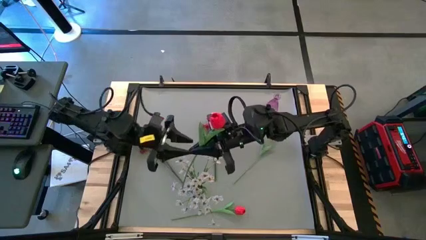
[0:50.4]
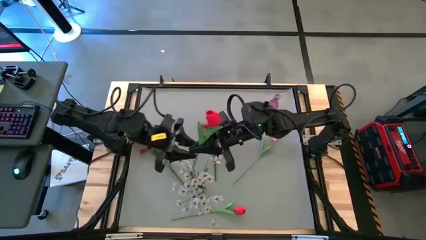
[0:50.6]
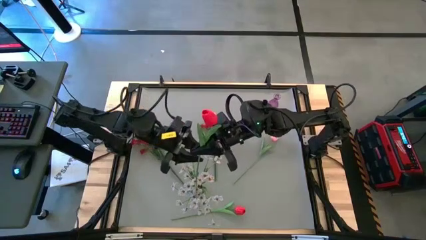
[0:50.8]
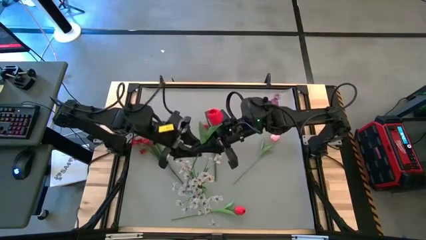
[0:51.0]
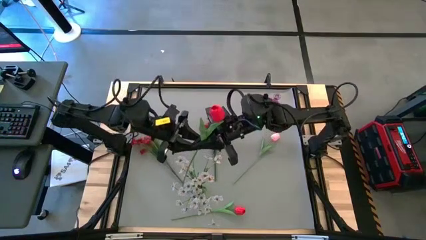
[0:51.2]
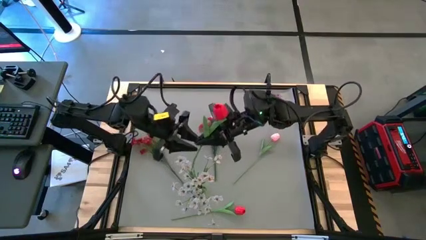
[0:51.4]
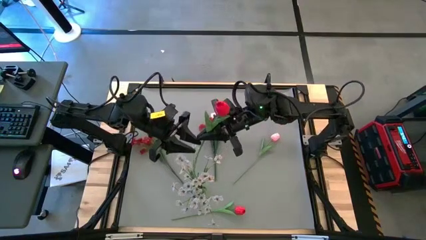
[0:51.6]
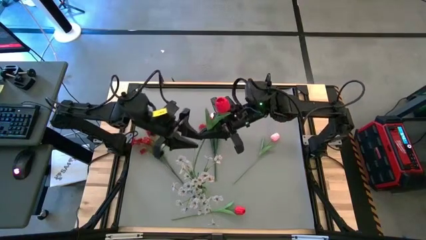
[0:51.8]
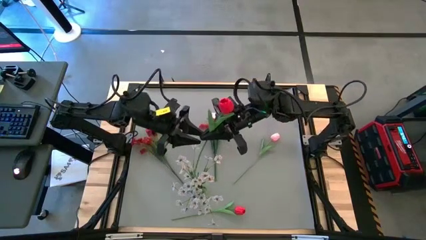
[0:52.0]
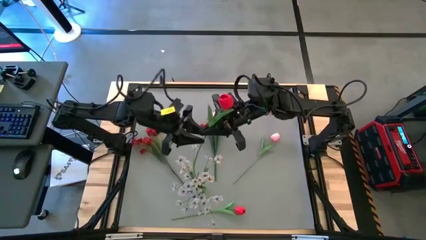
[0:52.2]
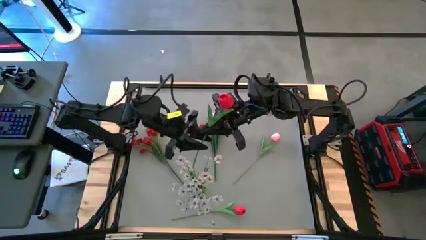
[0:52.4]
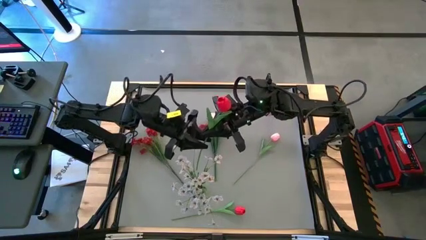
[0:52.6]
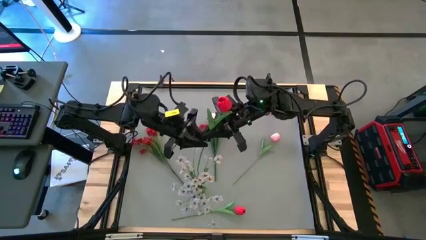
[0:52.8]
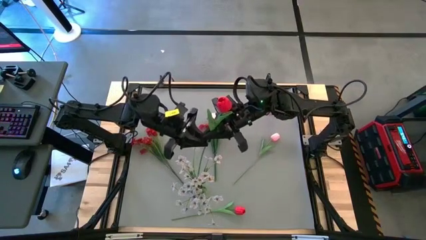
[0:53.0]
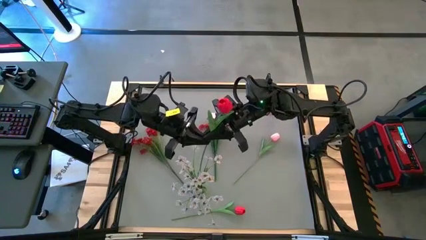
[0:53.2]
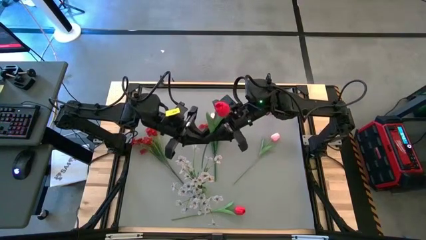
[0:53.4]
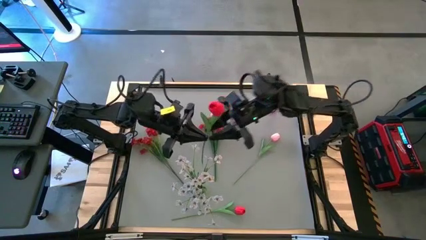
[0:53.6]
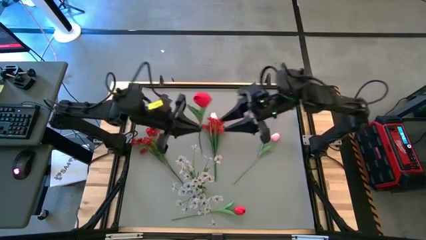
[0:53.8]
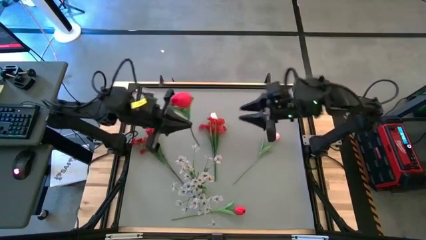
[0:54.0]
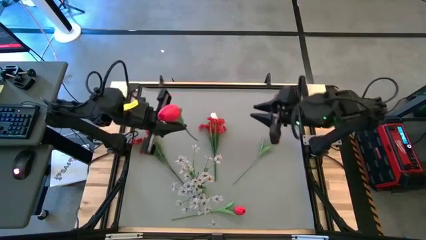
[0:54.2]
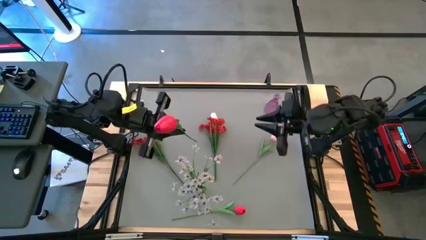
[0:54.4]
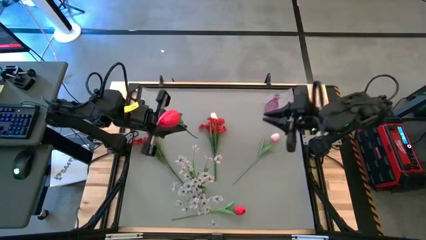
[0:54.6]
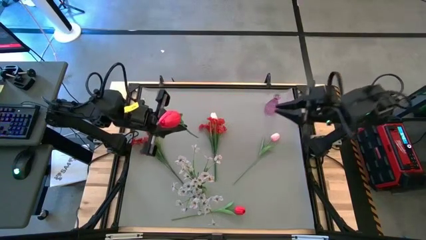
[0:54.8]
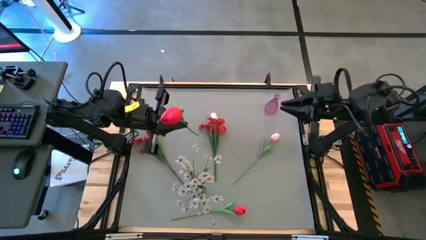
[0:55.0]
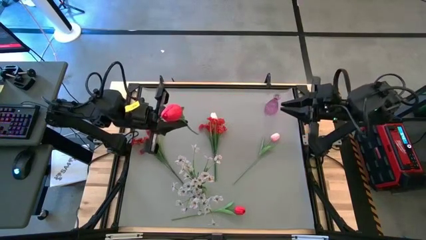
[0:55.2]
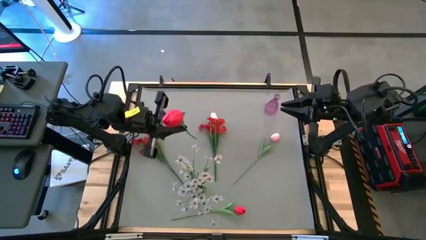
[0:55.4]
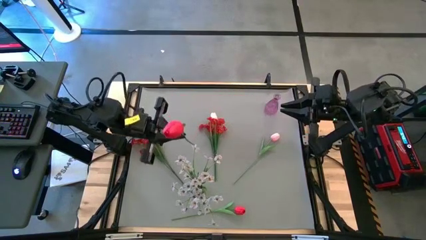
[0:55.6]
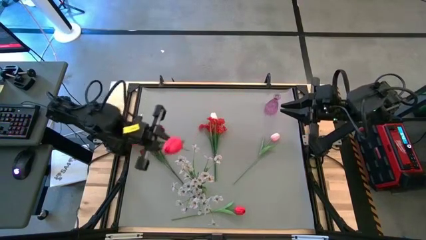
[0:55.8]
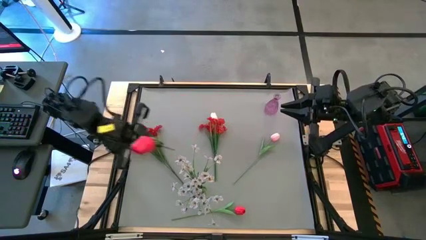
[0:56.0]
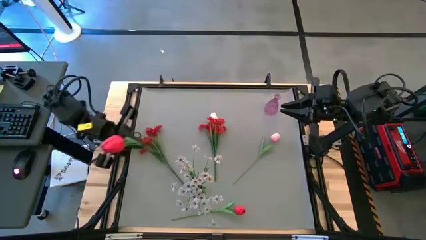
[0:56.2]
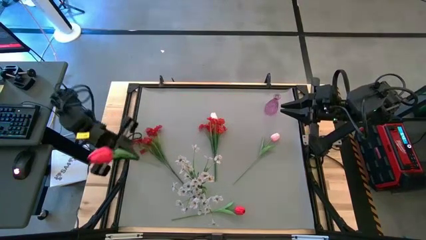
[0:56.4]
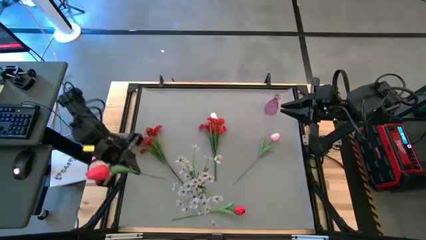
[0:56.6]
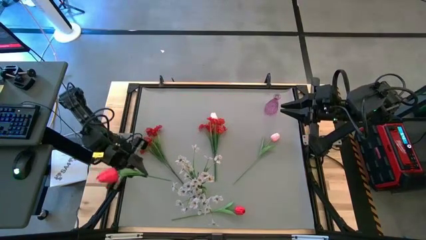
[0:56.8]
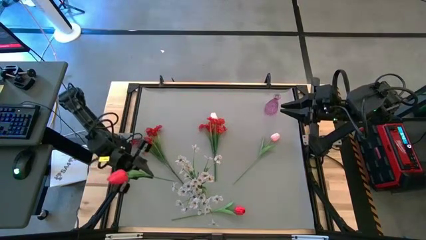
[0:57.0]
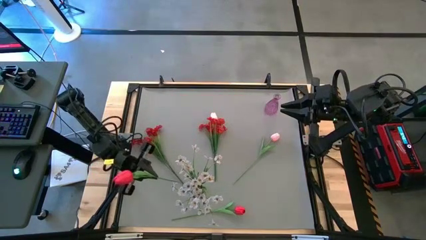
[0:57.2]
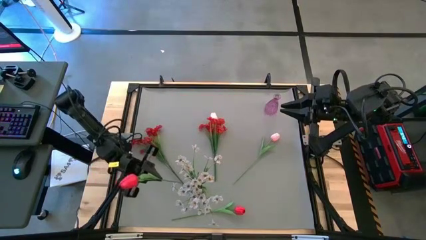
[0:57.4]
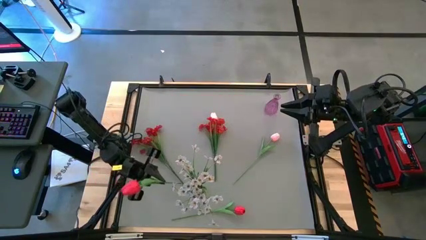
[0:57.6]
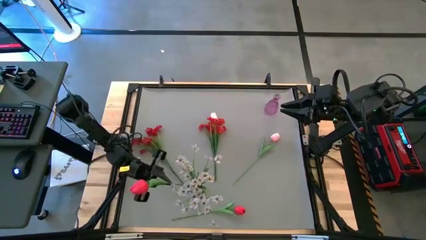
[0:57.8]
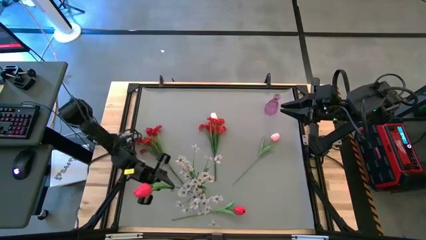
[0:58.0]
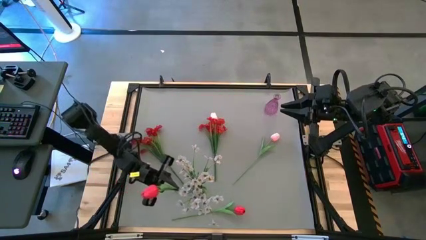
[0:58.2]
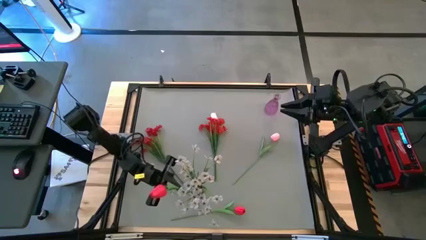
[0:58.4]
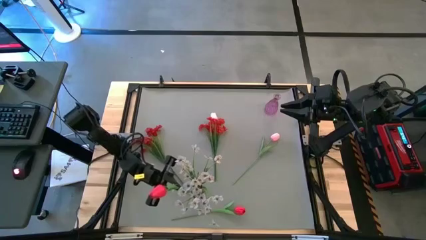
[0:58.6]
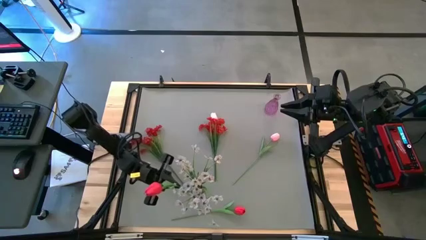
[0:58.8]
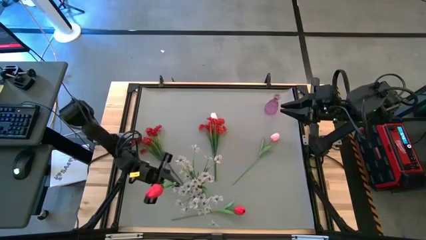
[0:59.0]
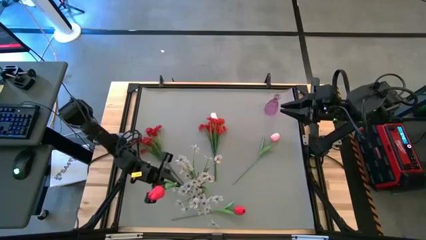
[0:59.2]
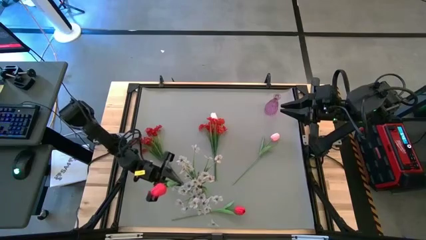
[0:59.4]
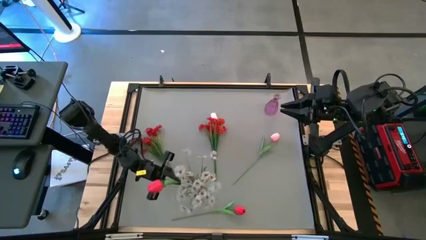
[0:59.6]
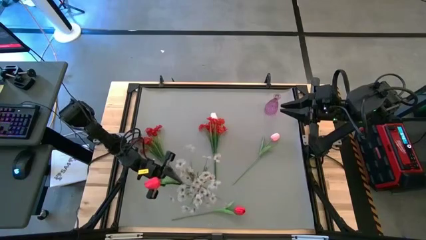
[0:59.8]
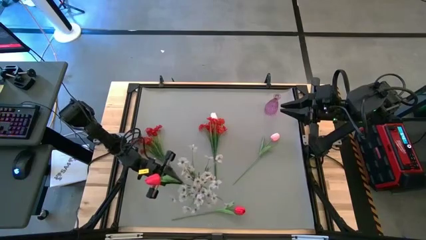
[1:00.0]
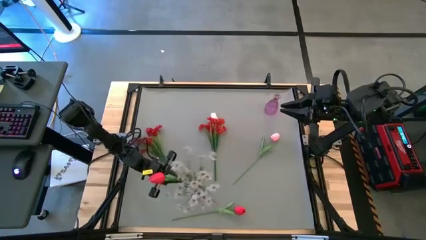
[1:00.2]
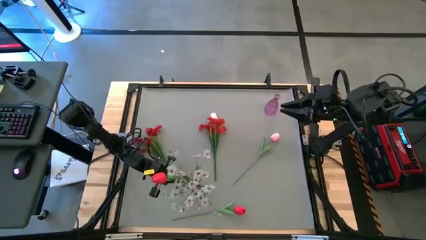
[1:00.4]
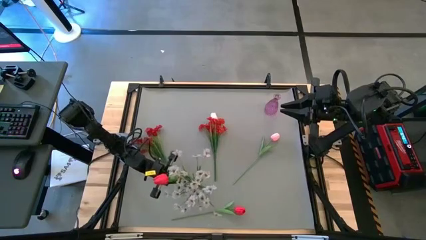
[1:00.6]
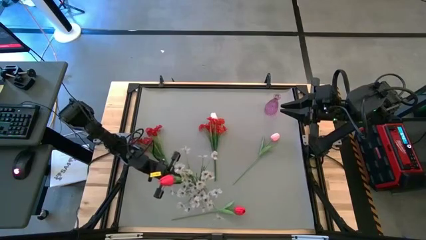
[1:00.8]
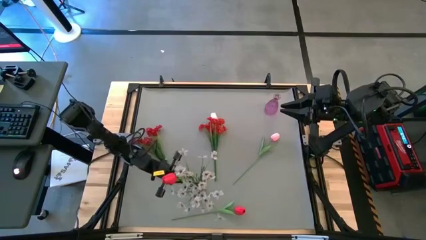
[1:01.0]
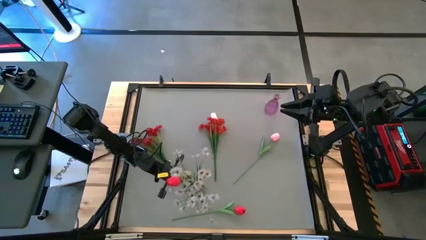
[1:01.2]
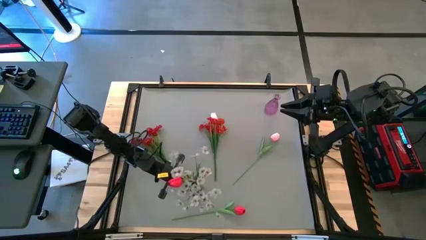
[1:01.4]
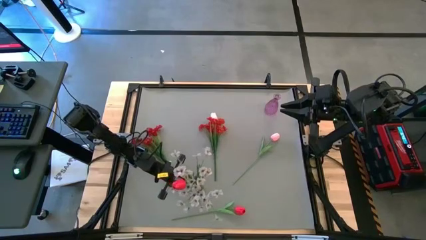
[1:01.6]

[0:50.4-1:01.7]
Task: Sort flowers into vase by color
Put the bottom red flower into the green vase

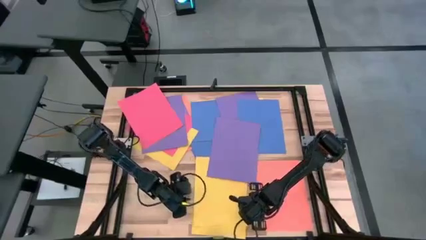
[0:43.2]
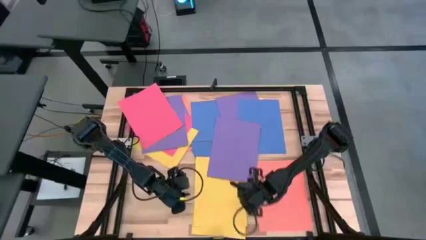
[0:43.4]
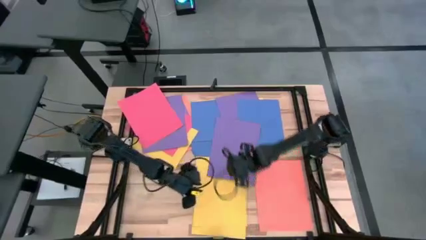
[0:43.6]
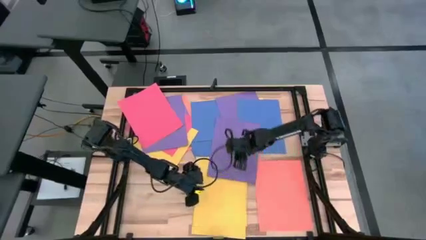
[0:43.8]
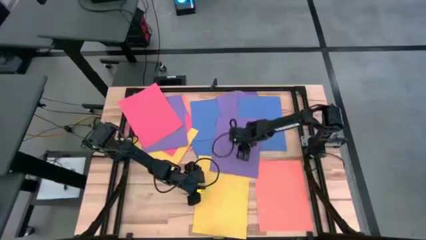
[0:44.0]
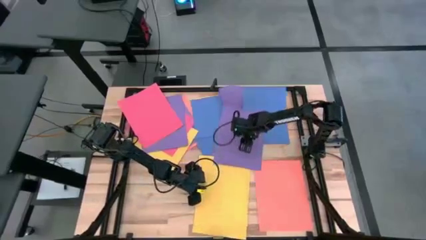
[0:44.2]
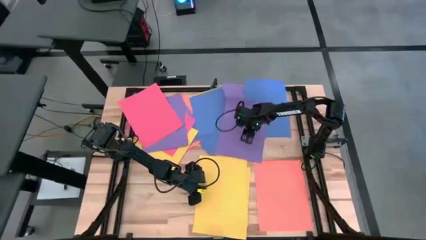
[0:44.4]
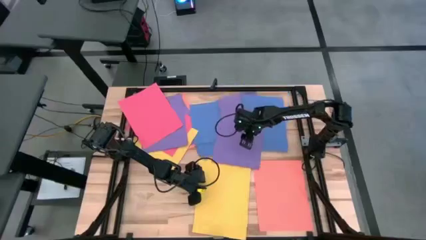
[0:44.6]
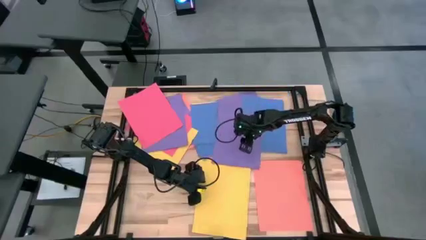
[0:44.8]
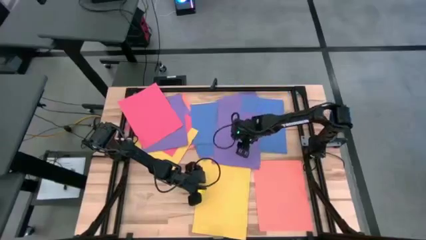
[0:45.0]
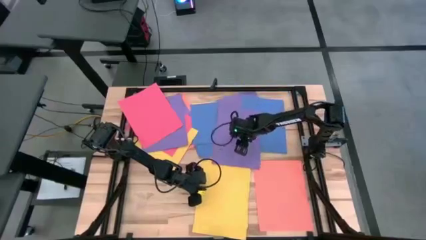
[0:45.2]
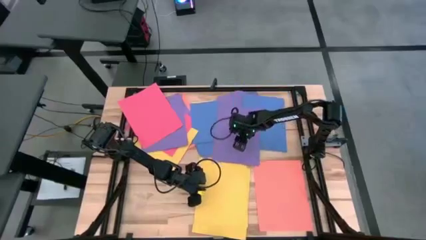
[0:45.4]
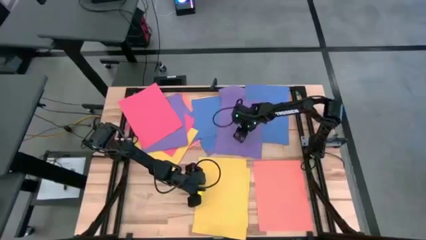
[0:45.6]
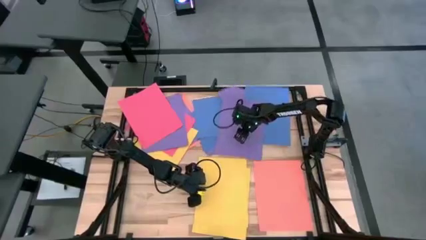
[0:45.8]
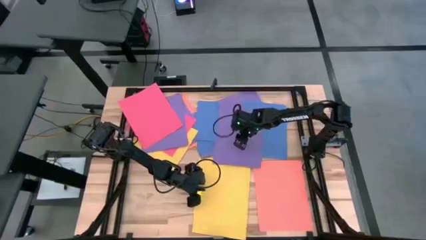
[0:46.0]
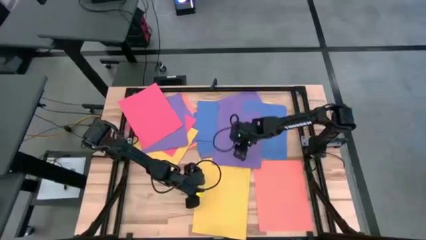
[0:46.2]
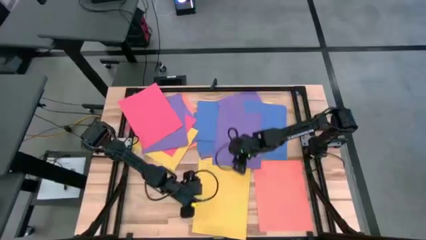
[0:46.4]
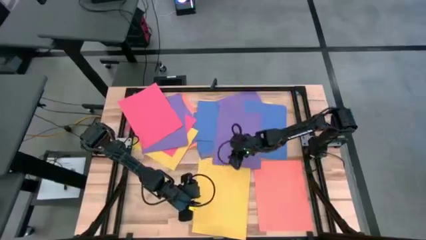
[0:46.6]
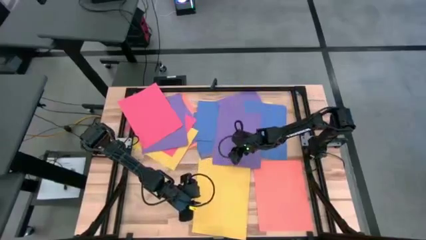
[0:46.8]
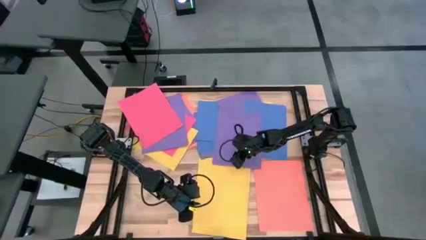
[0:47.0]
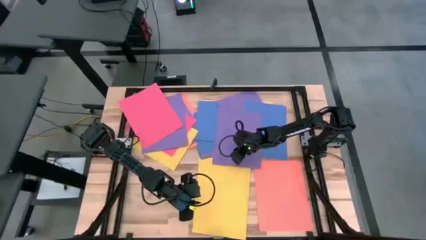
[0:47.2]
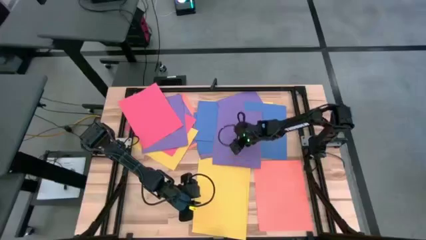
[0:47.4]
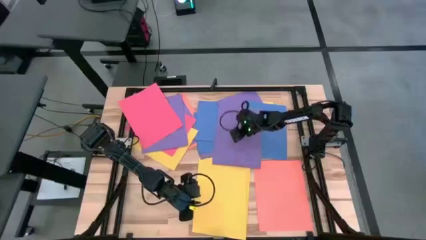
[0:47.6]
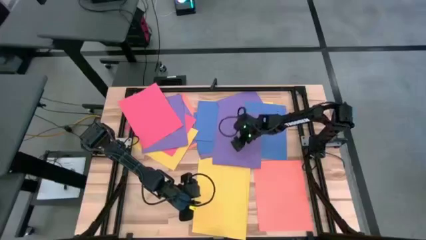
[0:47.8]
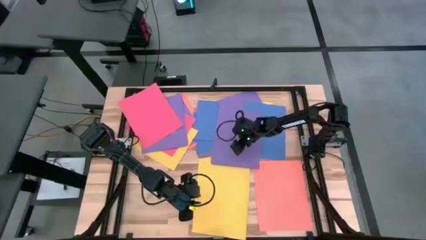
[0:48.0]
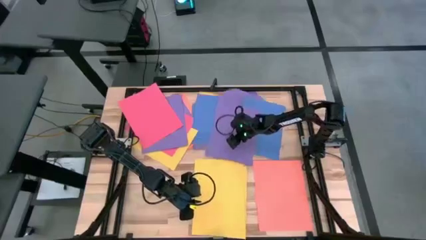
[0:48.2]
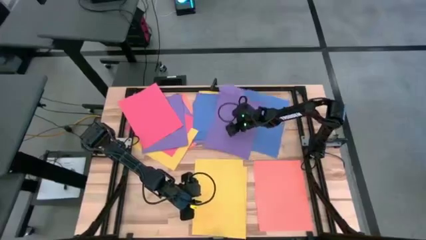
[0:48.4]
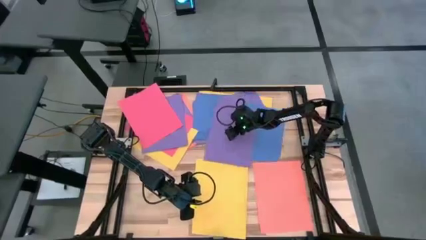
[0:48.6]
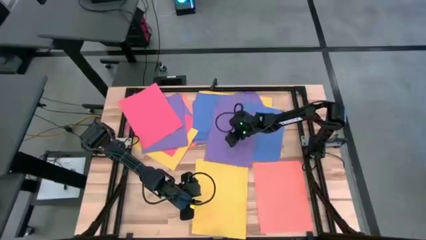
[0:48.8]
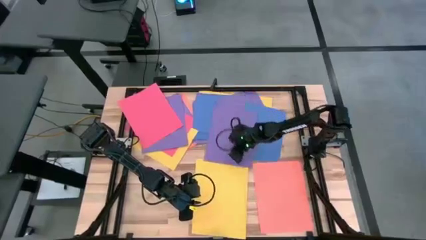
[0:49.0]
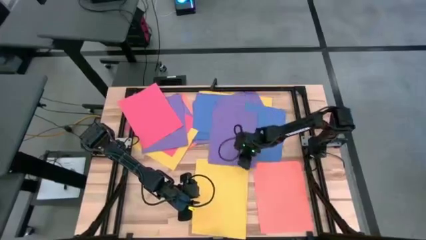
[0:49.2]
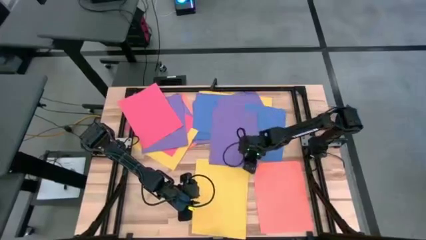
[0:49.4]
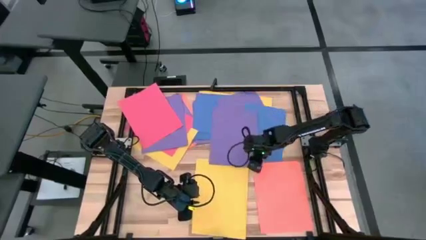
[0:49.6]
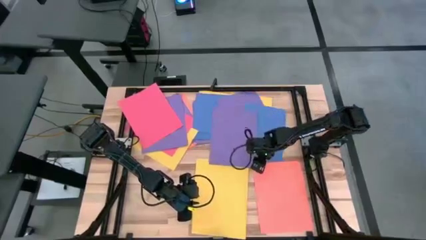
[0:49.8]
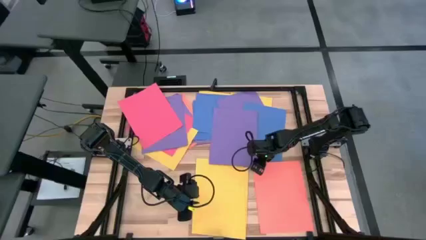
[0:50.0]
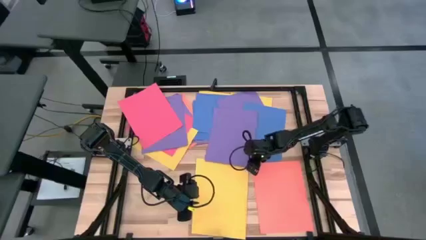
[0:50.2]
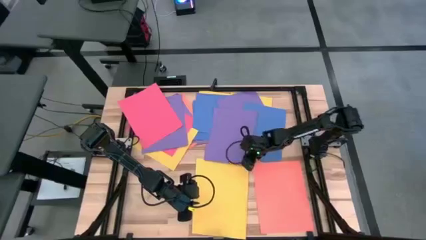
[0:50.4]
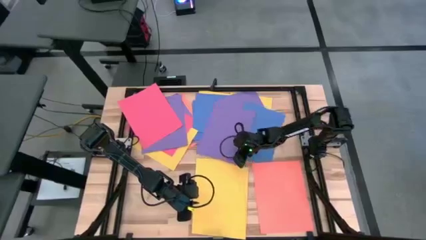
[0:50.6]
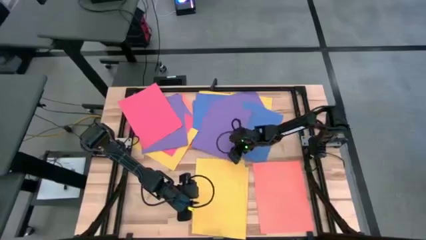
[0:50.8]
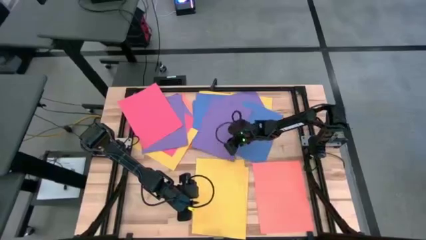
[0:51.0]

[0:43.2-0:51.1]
Task: Organize paper
Adjust the violet paper
